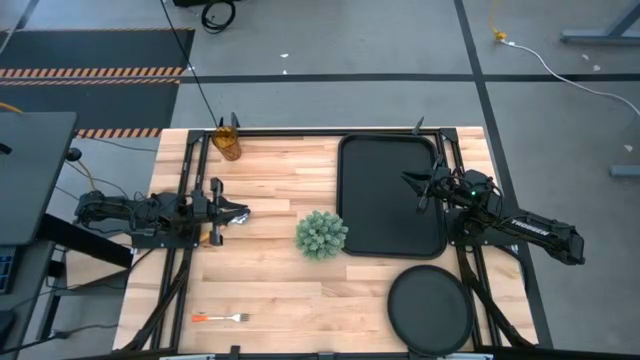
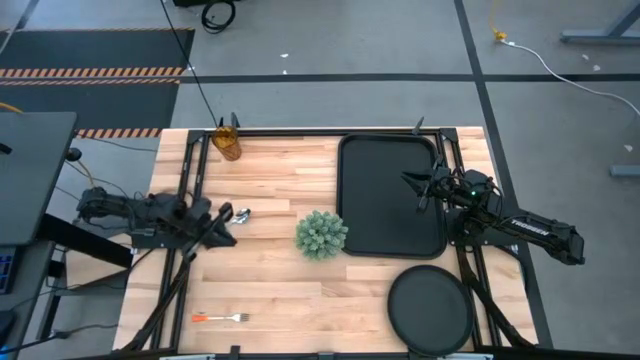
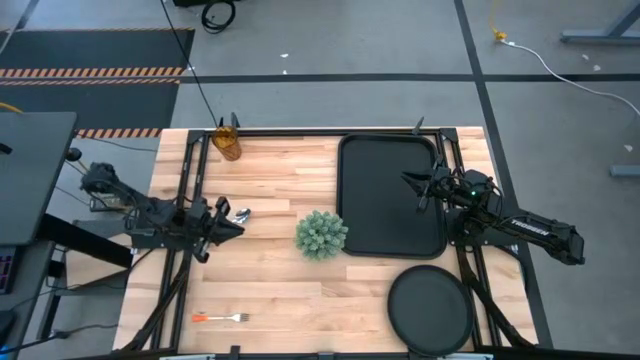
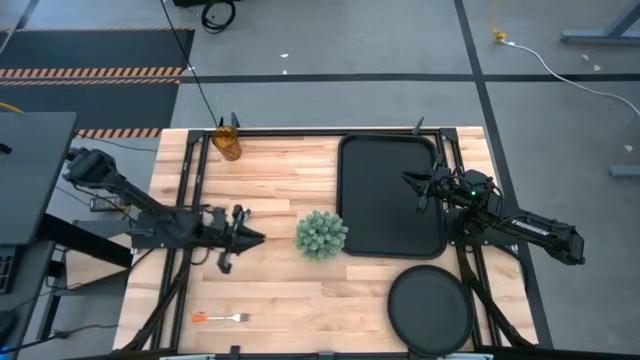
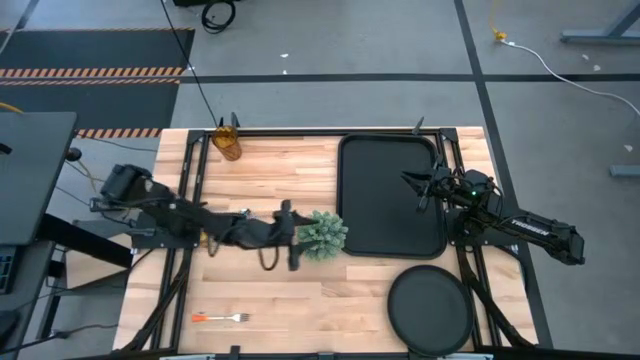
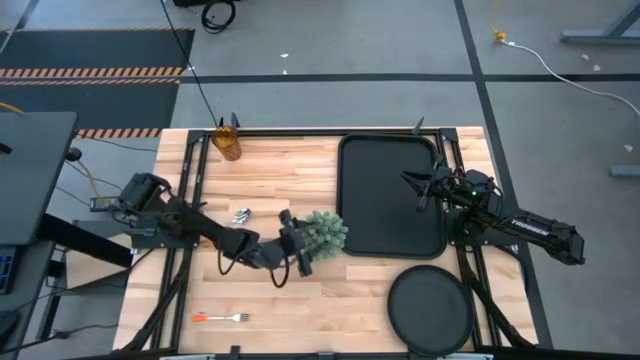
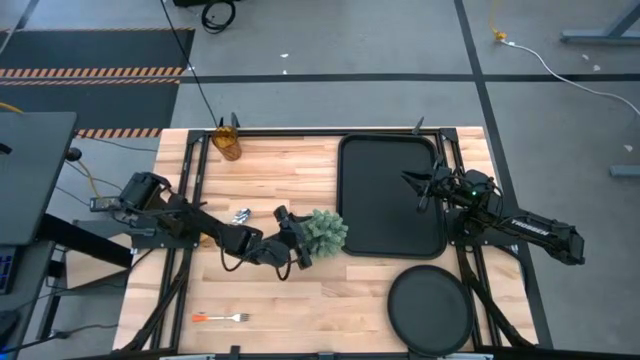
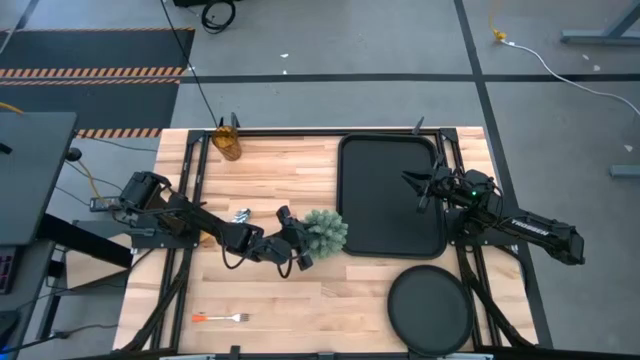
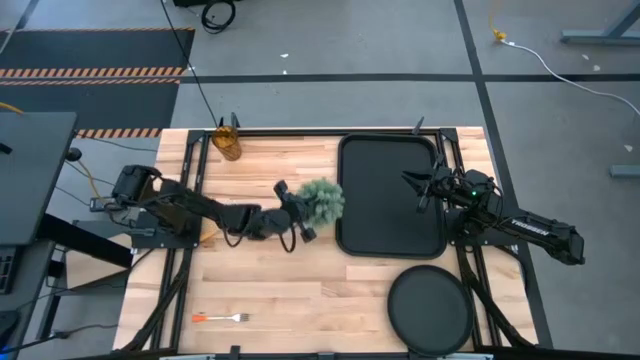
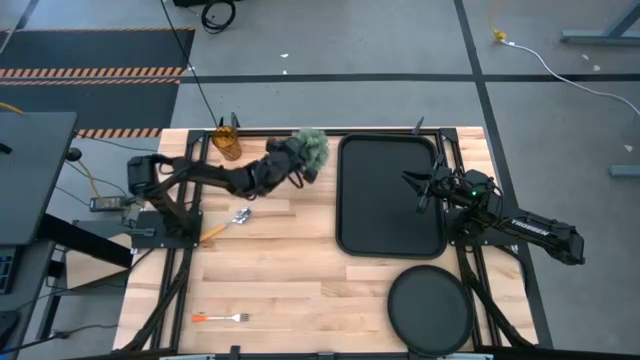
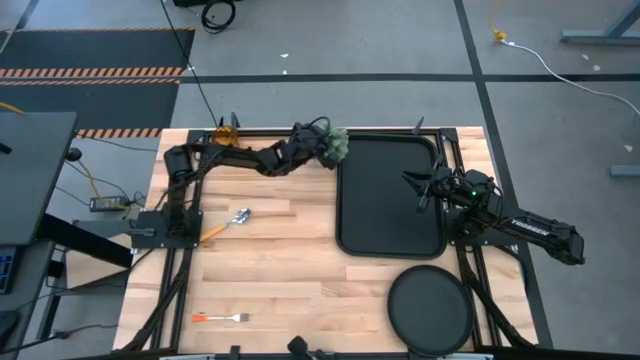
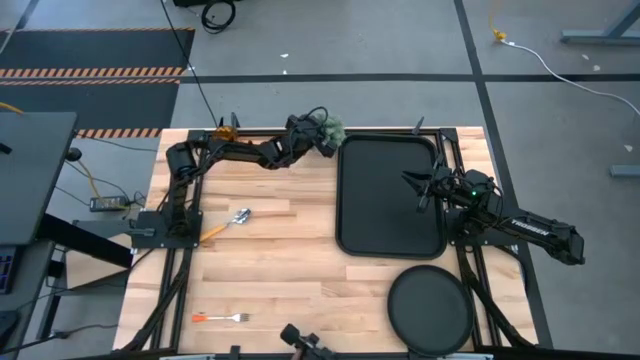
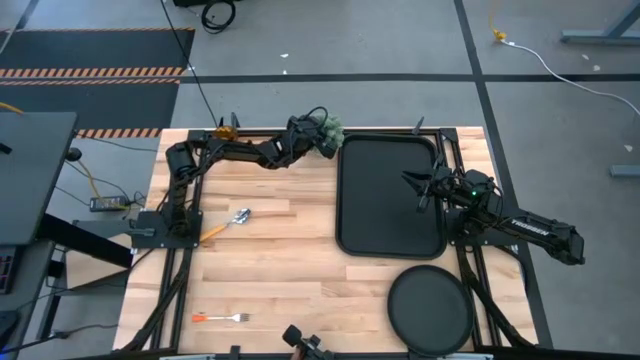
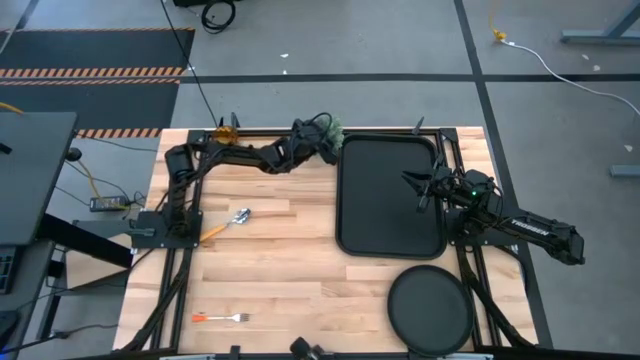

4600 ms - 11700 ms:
Task: Pick and place plate/cup/fork/spoon on tray
Move the flower pot to the top of the table

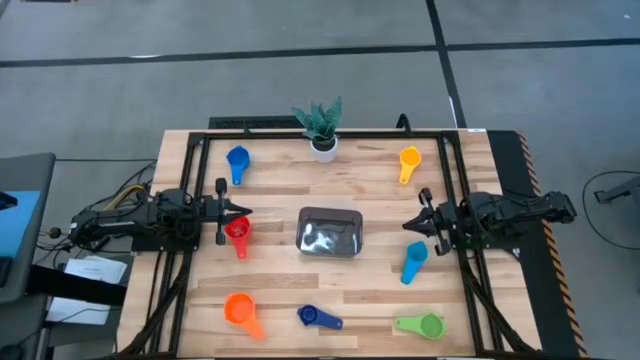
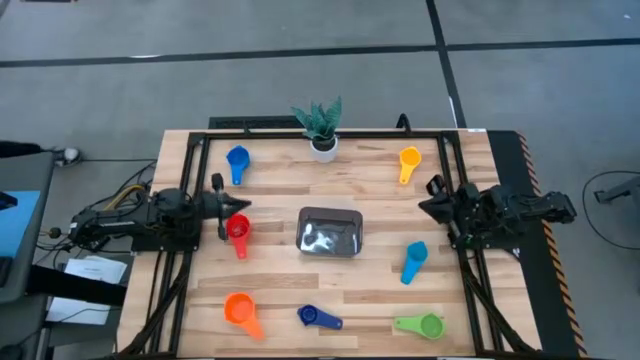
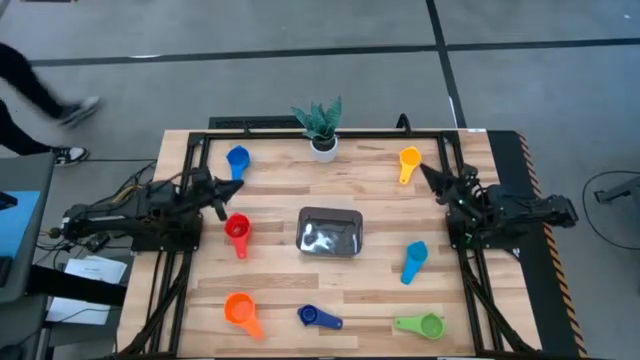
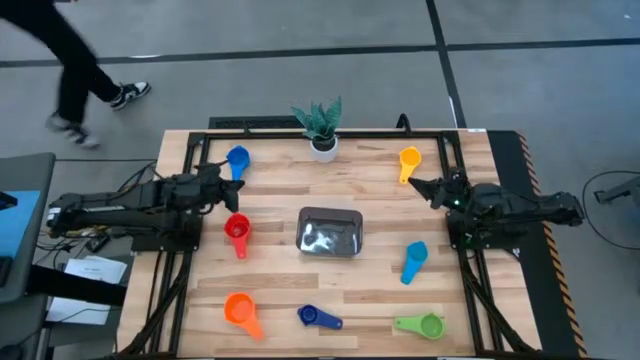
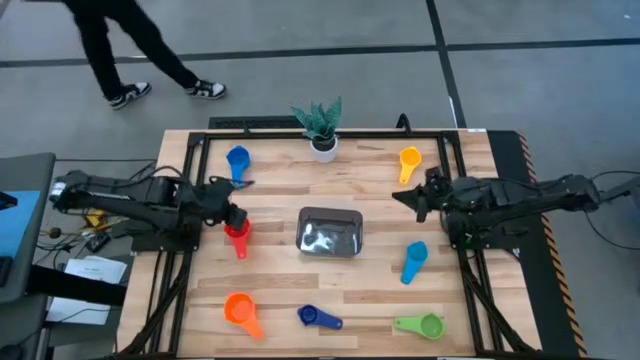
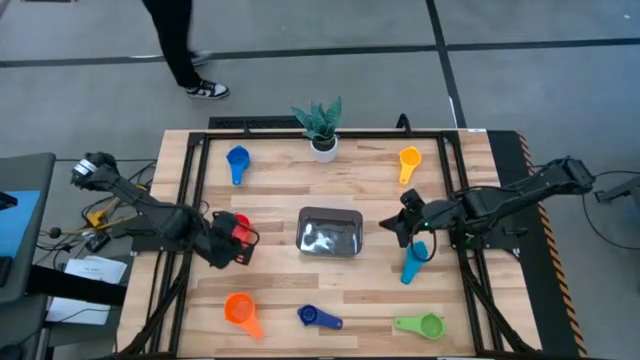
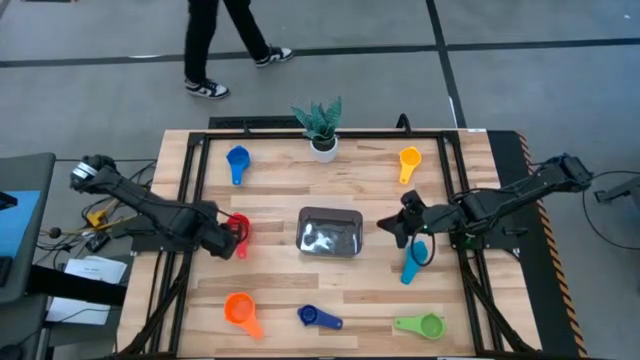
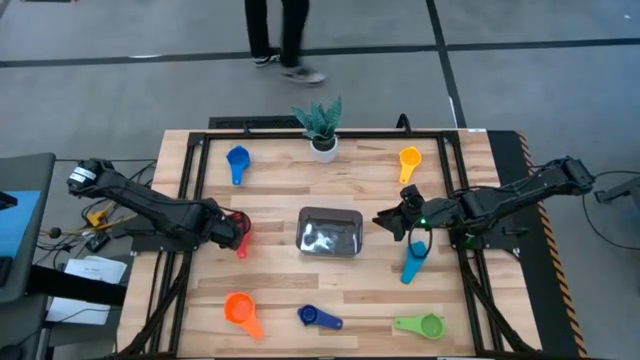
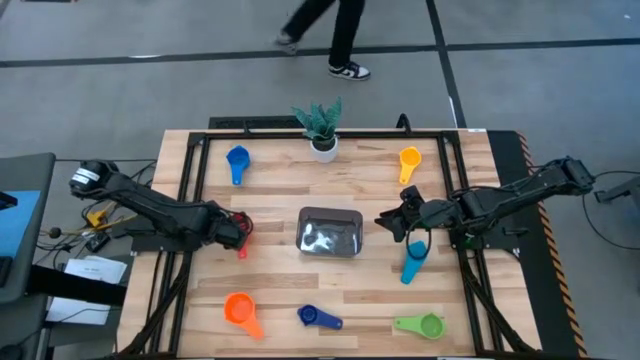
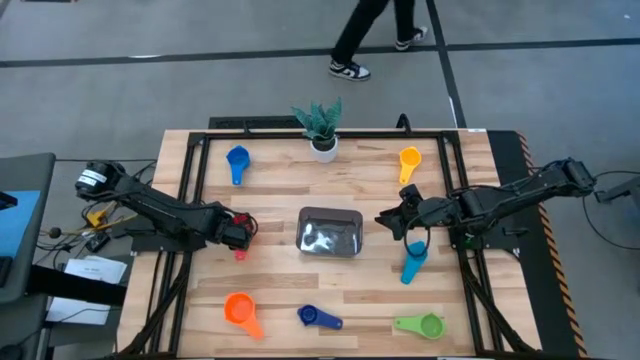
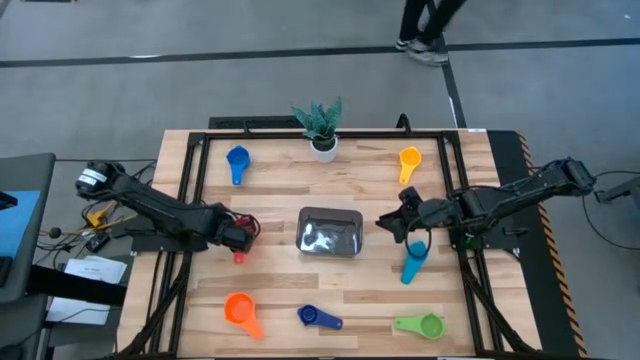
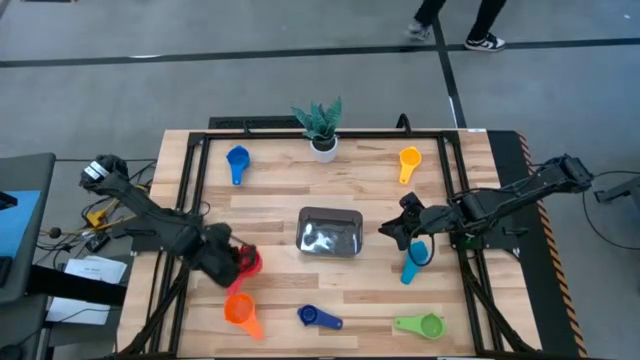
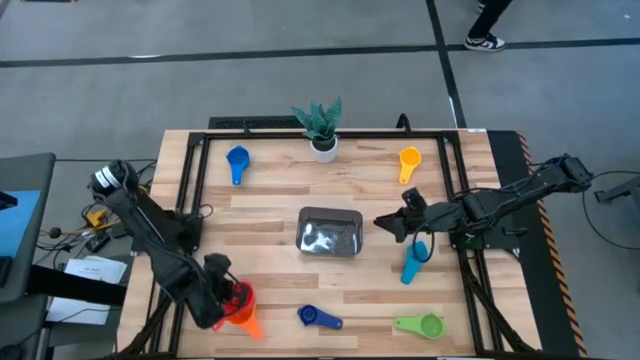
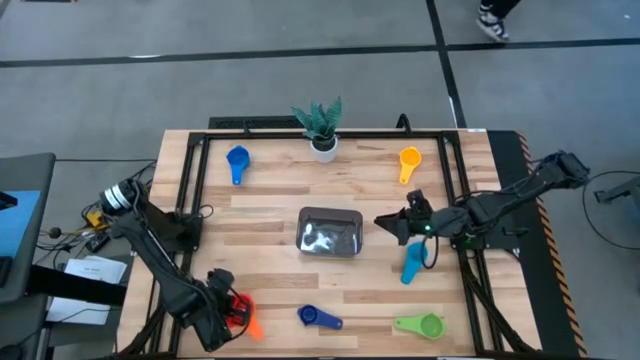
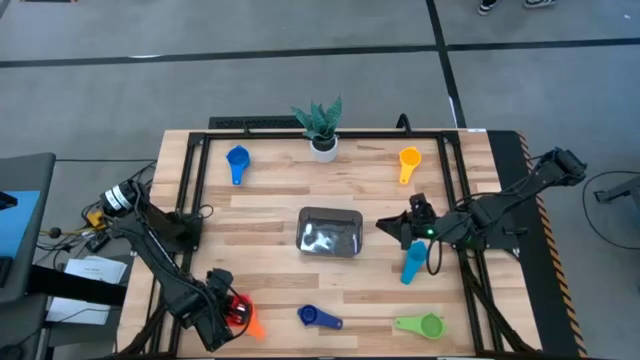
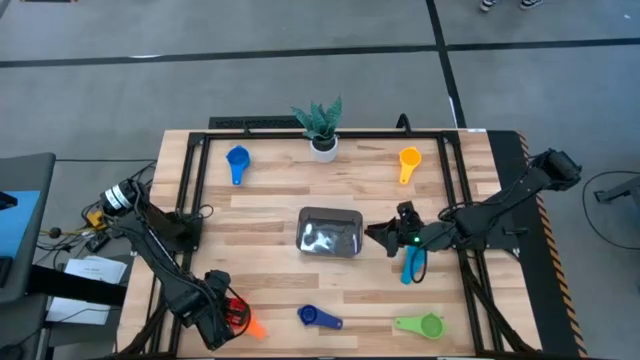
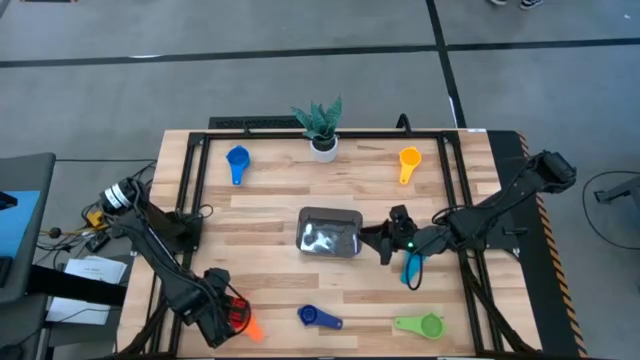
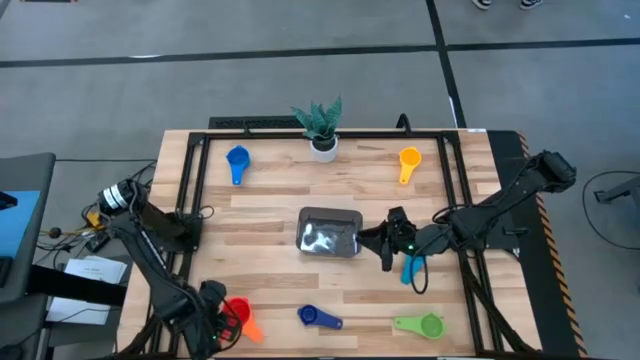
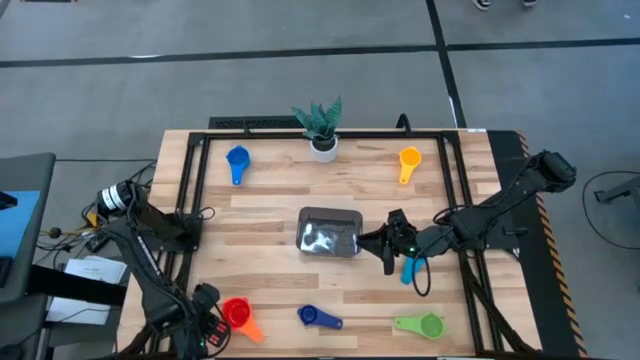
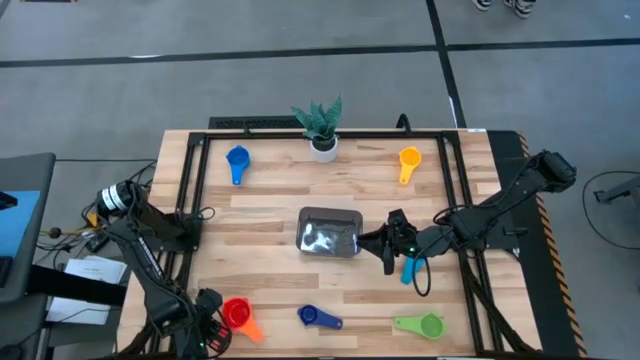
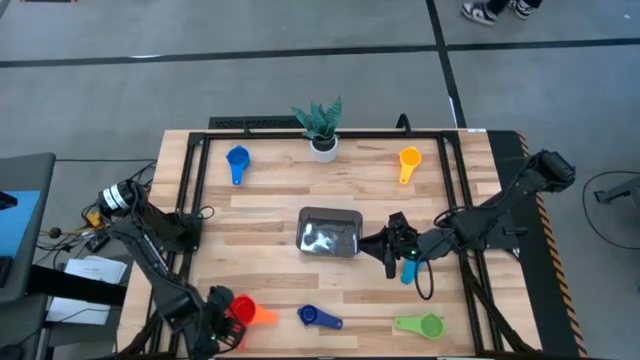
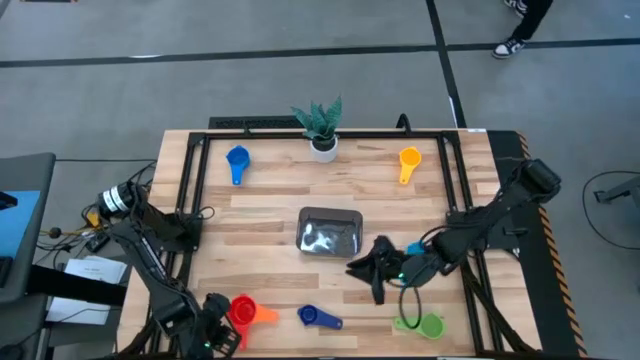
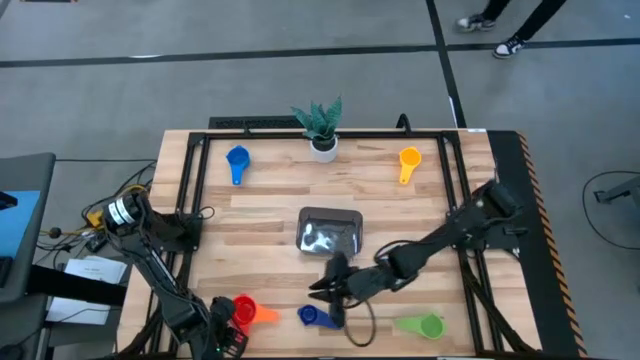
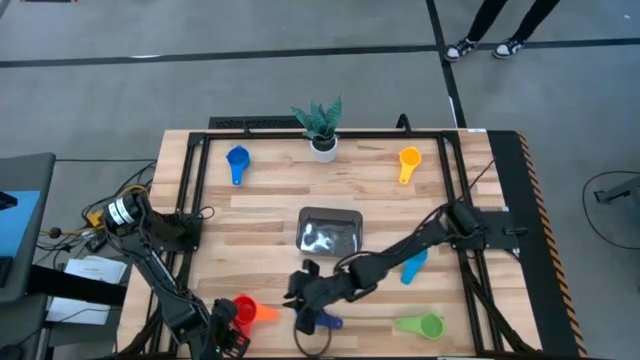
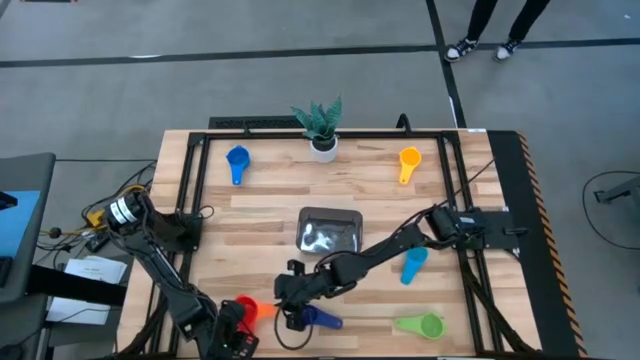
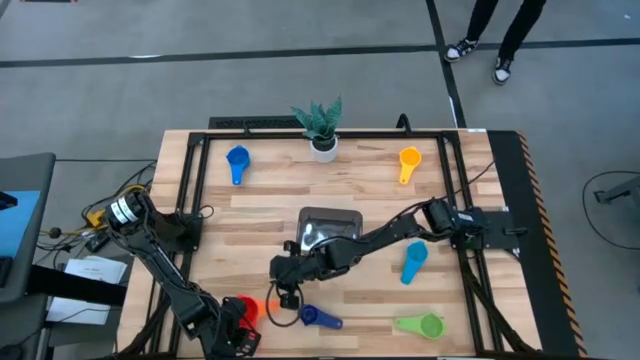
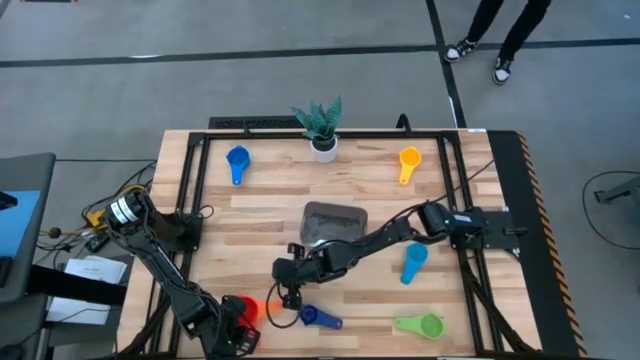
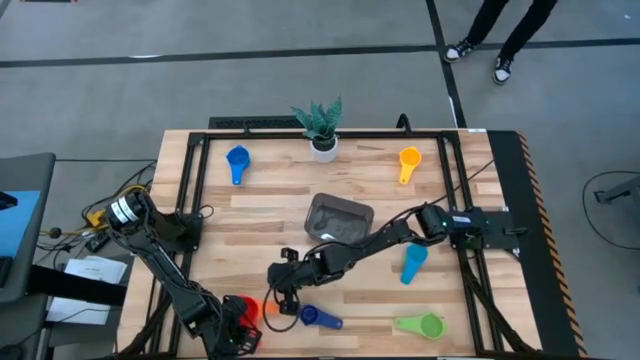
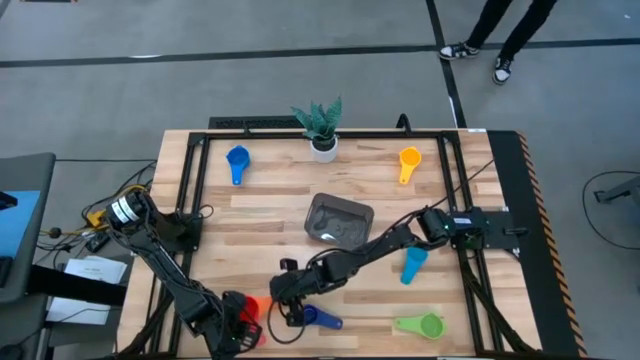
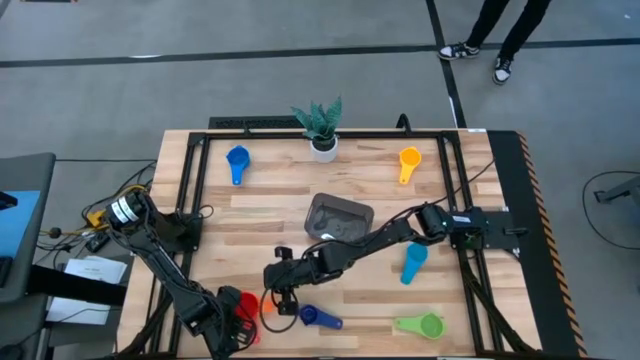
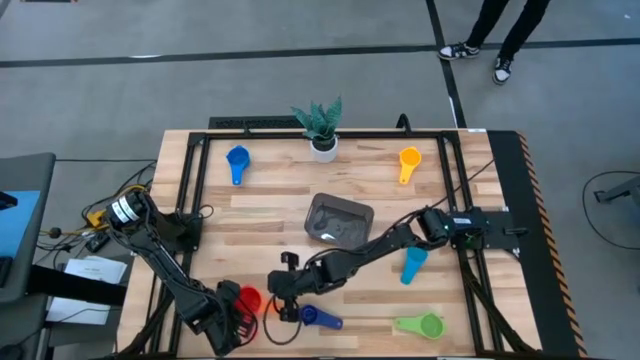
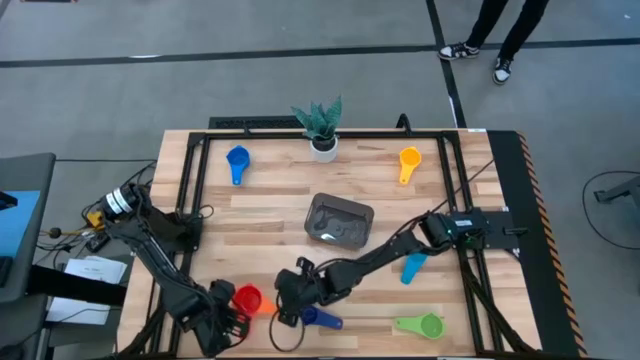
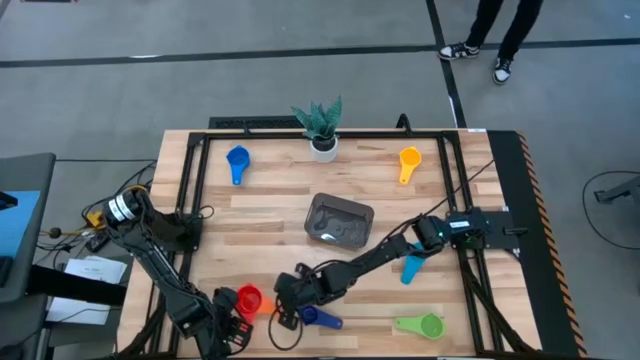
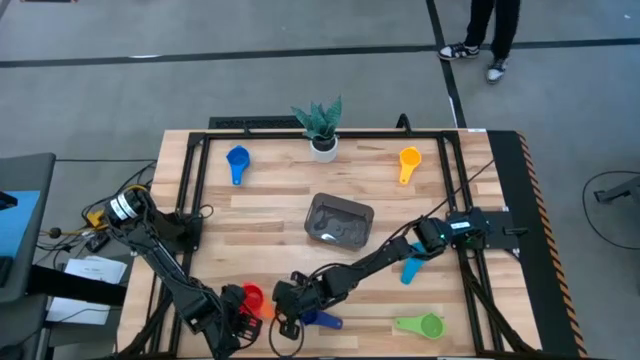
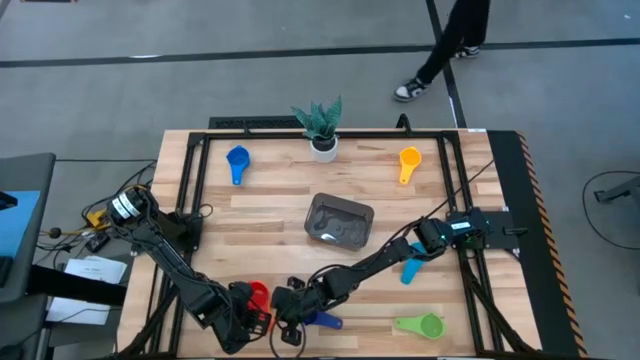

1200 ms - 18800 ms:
Task: Nest measuring cups in basket
Stack the red measuring cup on top of the orange measuring cup
